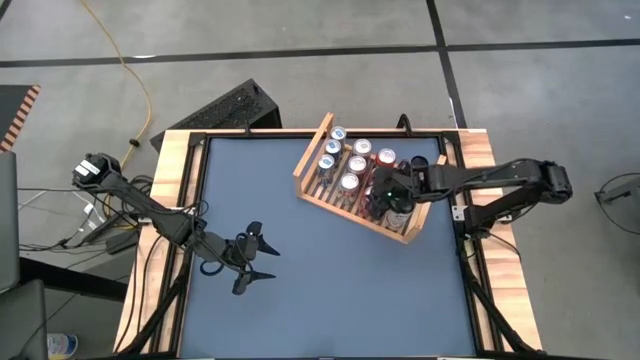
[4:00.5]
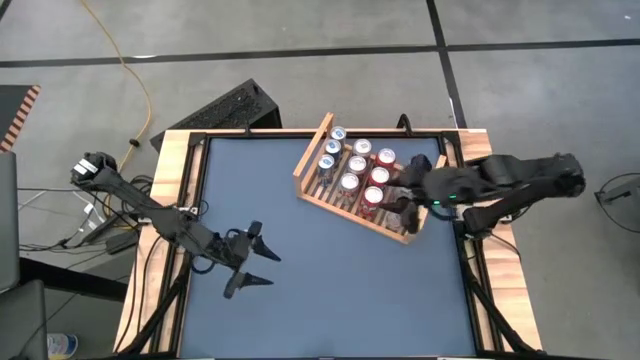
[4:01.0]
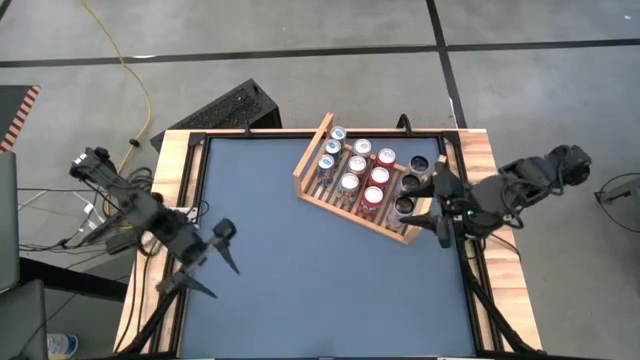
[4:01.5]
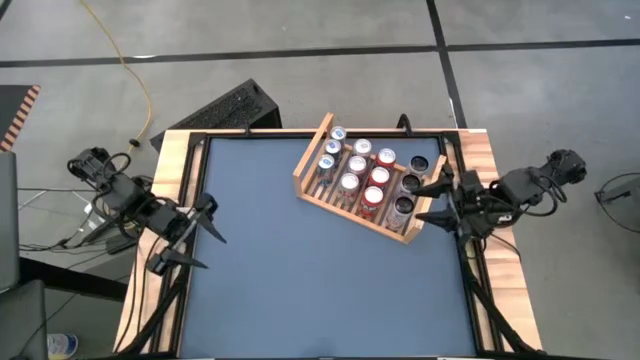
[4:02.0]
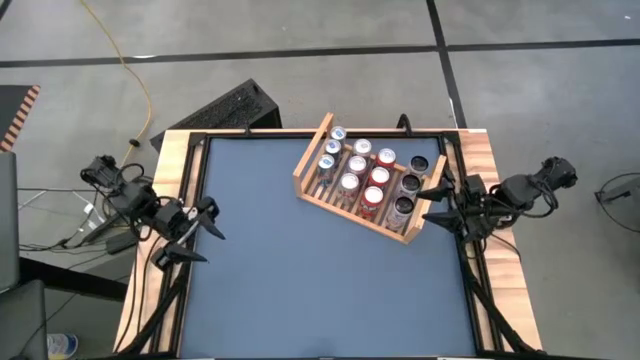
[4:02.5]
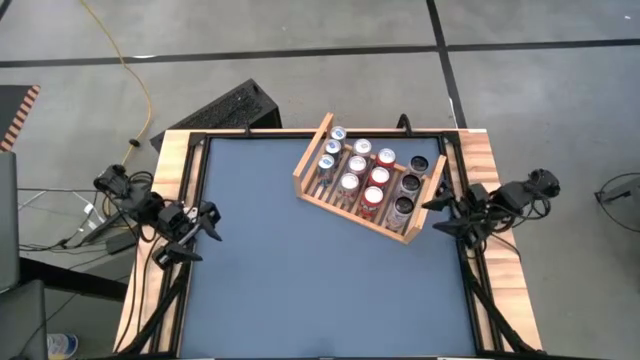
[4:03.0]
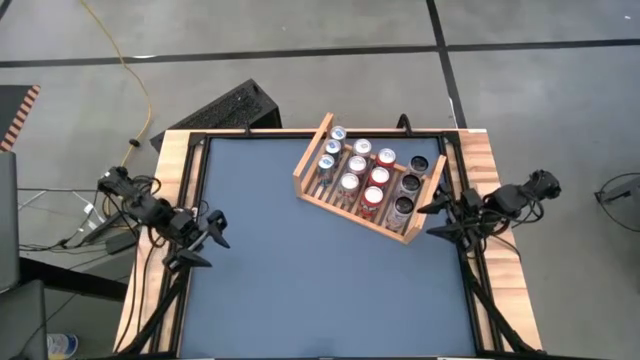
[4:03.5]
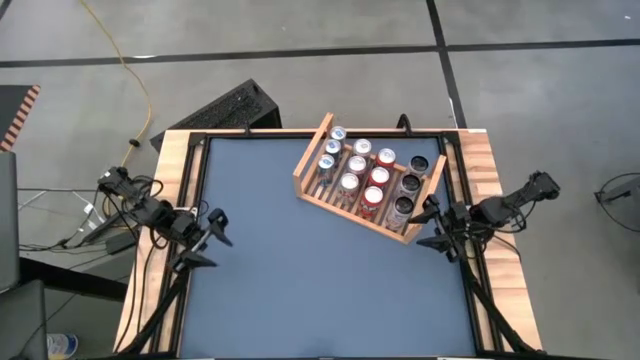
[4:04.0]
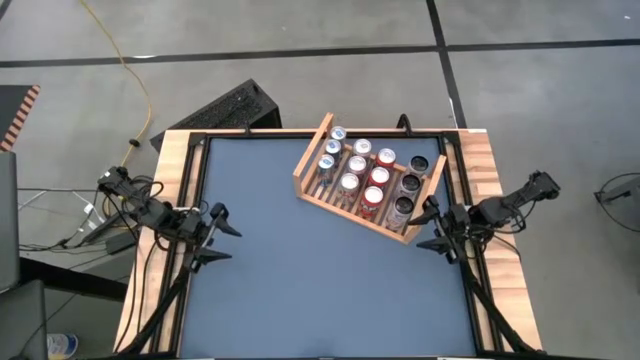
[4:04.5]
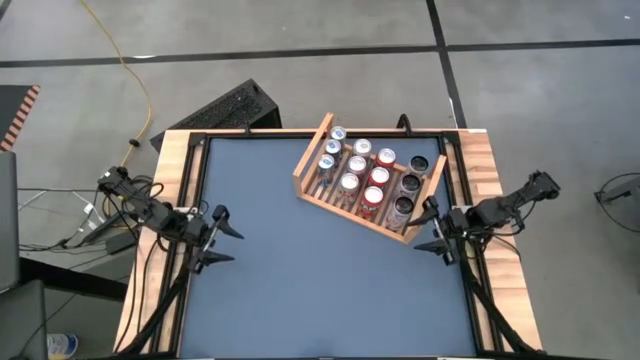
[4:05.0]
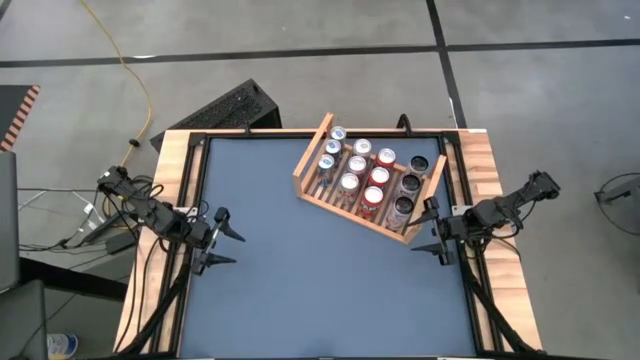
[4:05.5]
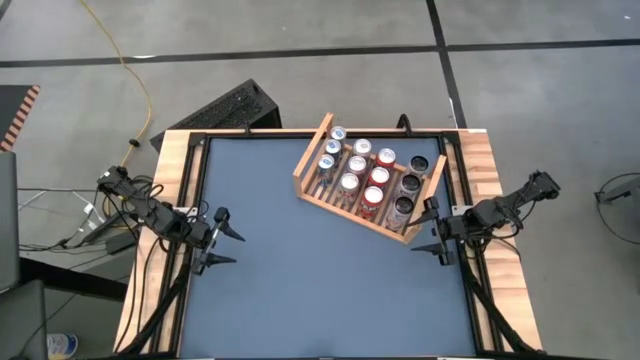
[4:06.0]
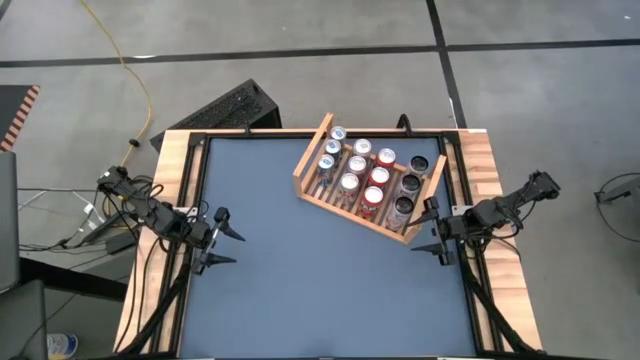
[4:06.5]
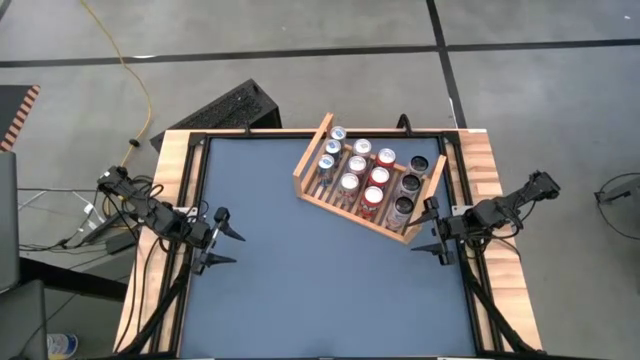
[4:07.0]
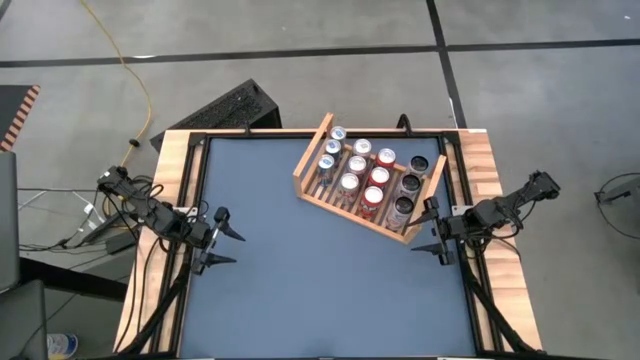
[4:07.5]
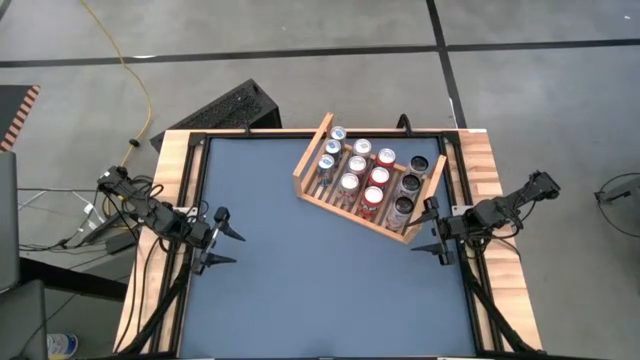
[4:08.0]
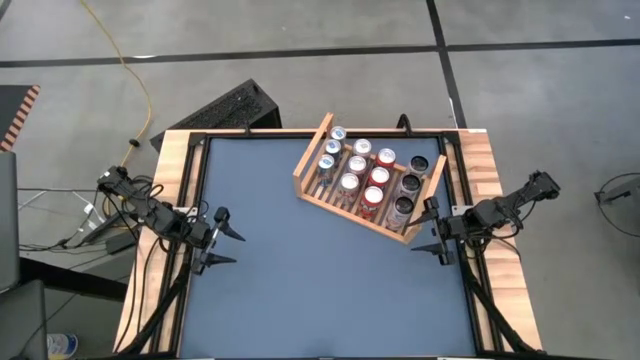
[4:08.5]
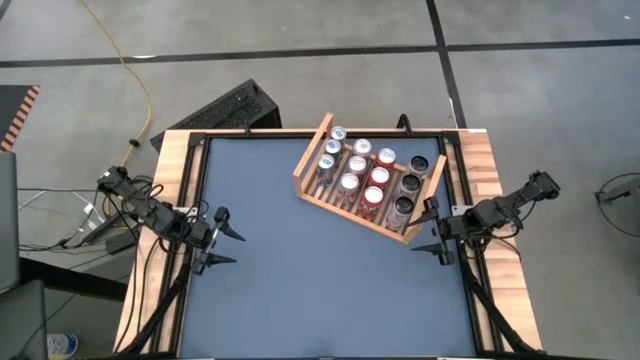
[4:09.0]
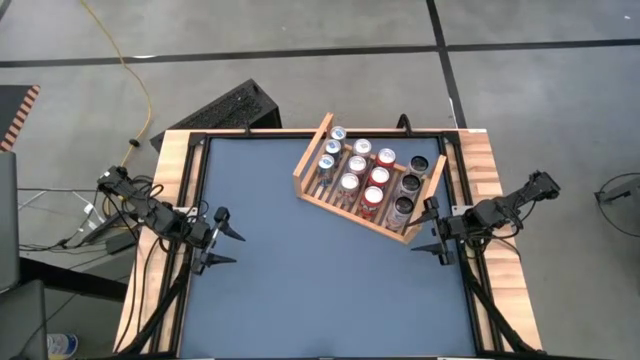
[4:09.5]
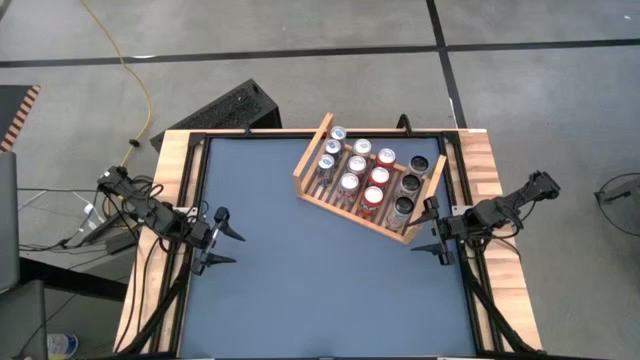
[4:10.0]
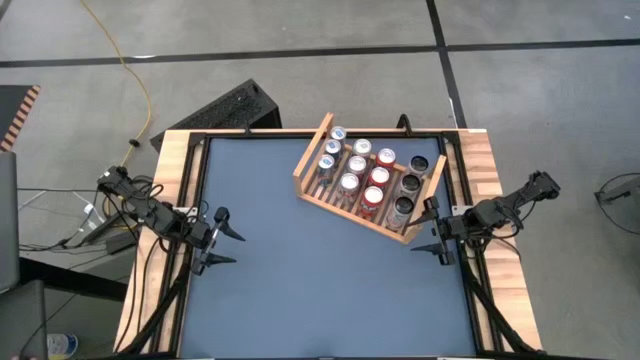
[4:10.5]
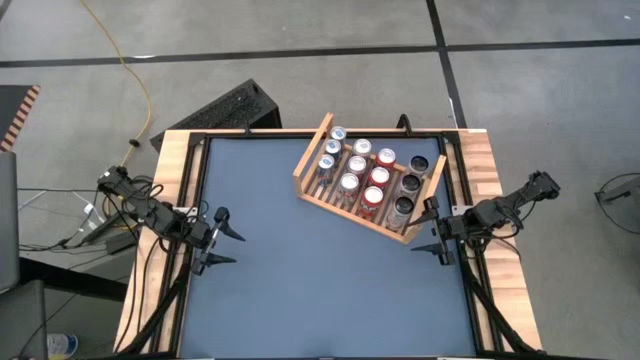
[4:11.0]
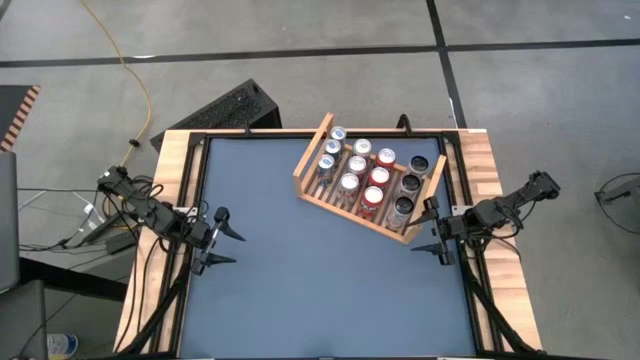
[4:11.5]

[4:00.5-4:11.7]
Task: Place canned beverage on shelf
Return to Home Position

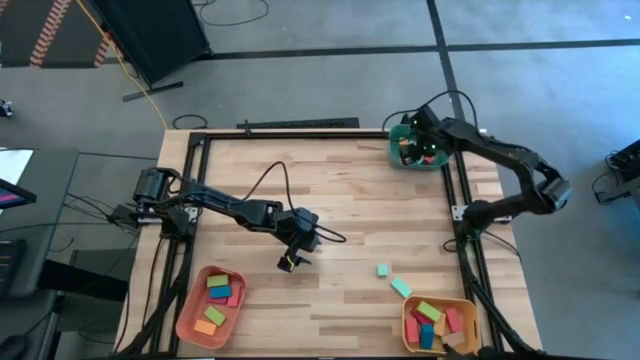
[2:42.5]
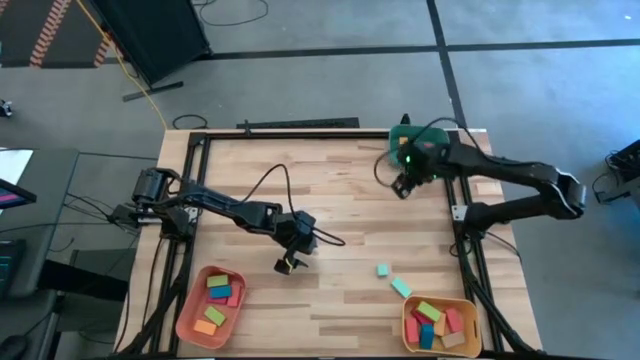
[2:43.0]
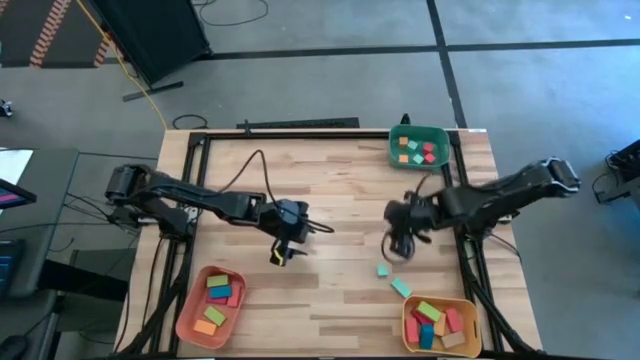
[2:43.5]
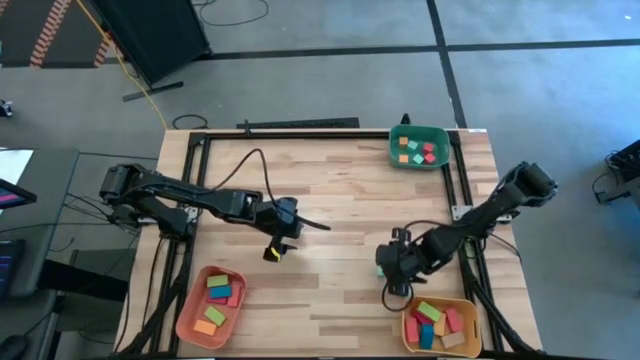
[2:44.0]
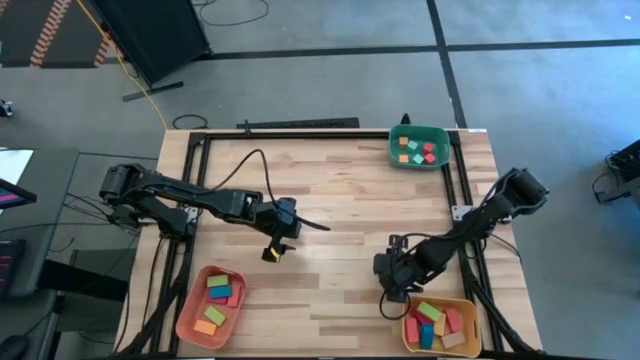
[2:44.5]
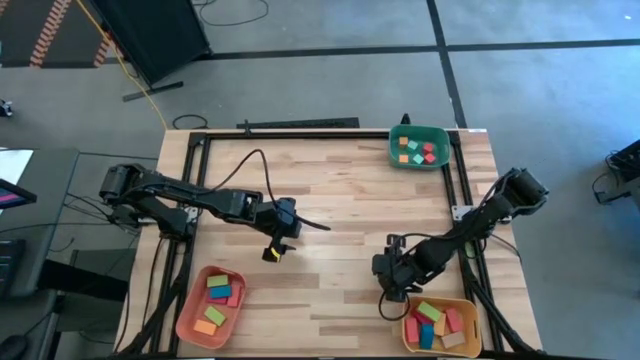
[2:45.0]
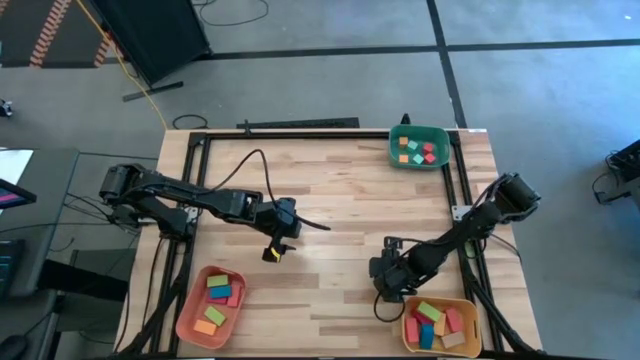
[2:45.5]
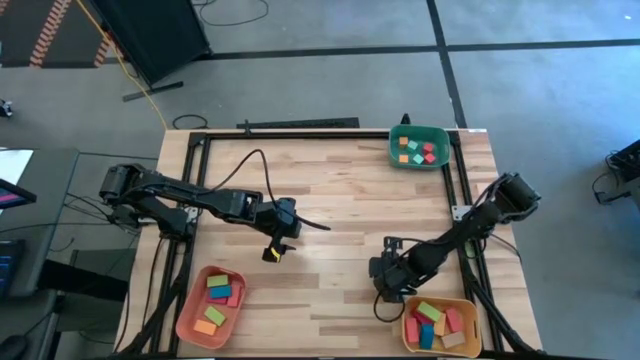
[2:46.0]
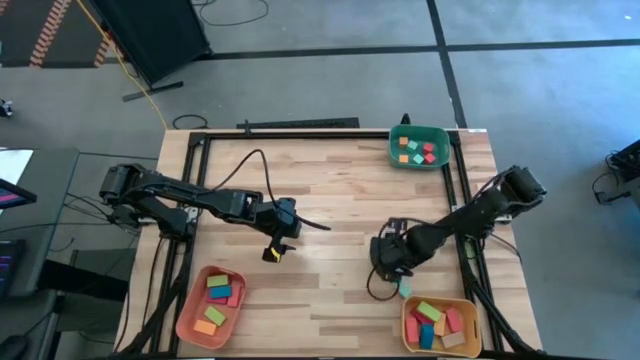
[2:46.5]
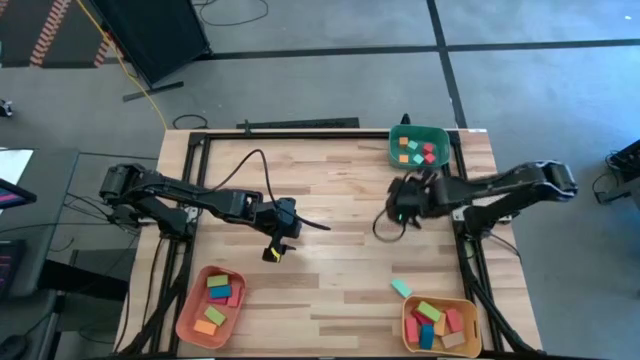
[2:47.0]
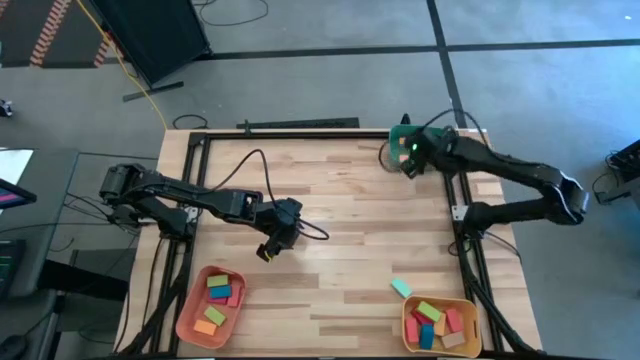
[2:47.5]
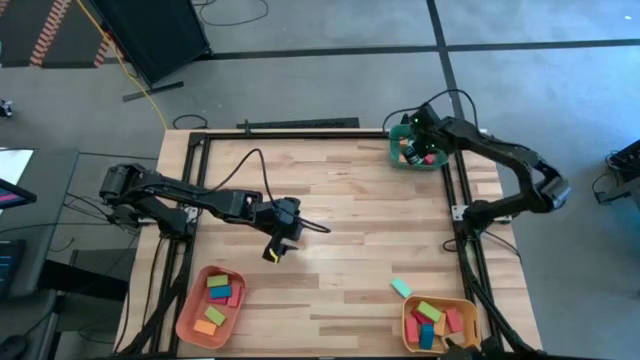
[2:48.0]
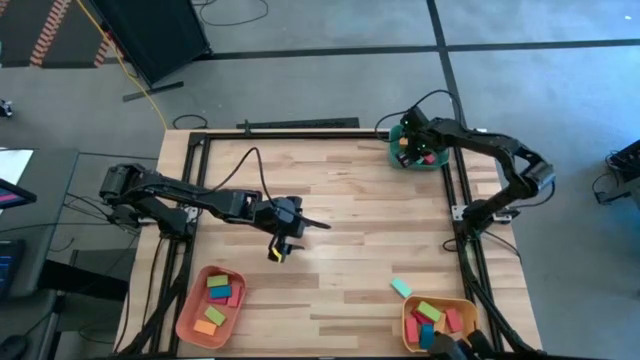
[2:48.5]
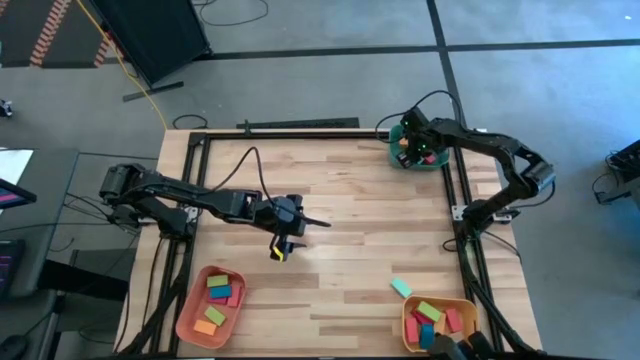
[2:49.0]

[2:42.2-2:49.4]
Task: Sort blocks by size
Put the small blue square block into the blue bin
